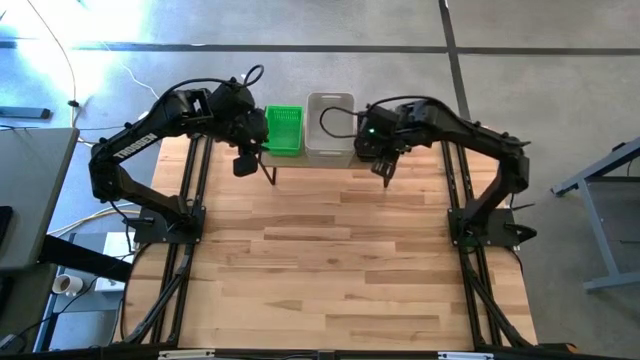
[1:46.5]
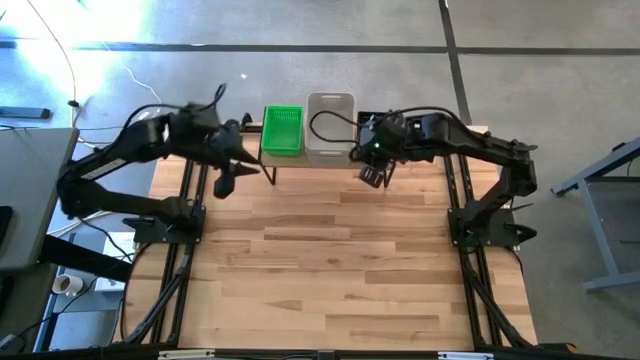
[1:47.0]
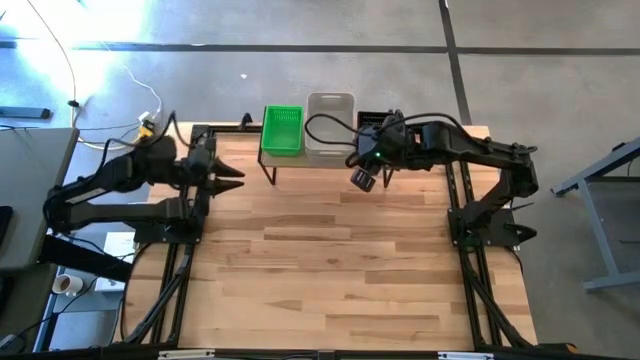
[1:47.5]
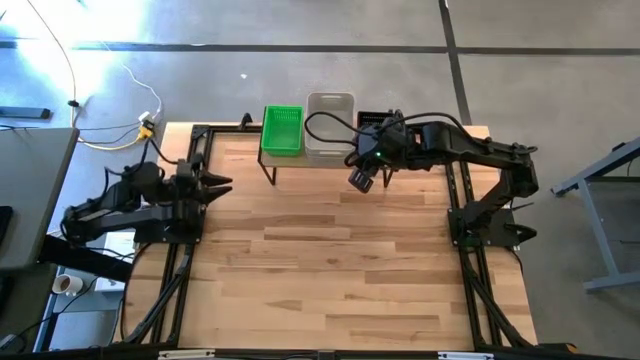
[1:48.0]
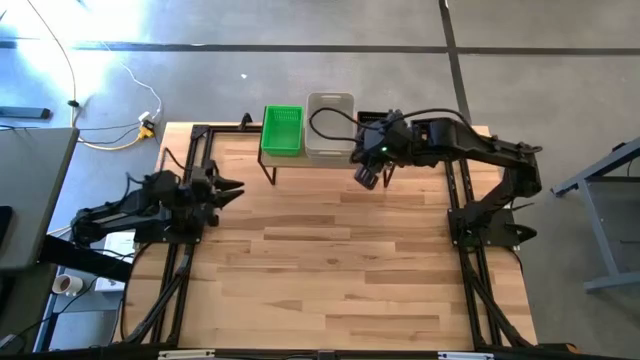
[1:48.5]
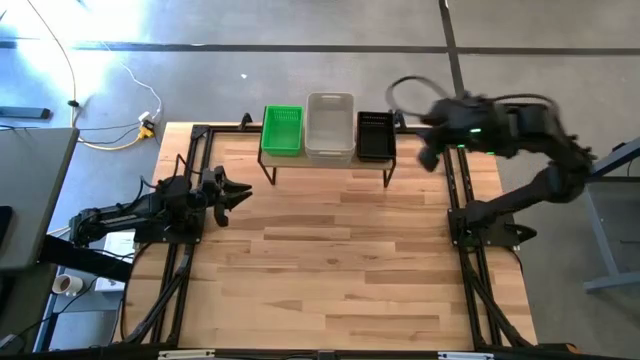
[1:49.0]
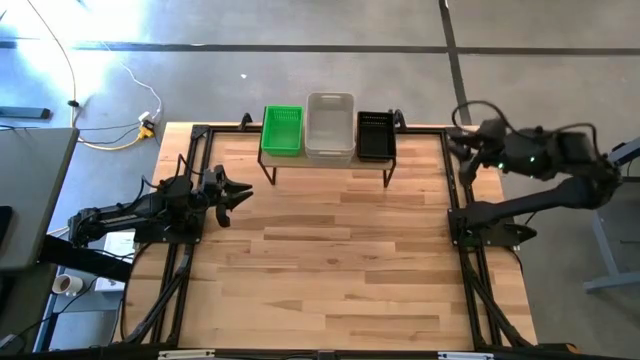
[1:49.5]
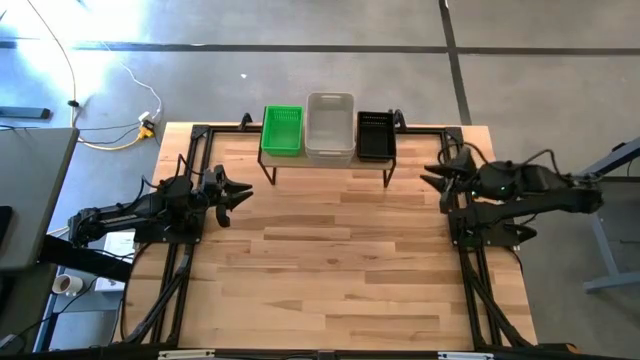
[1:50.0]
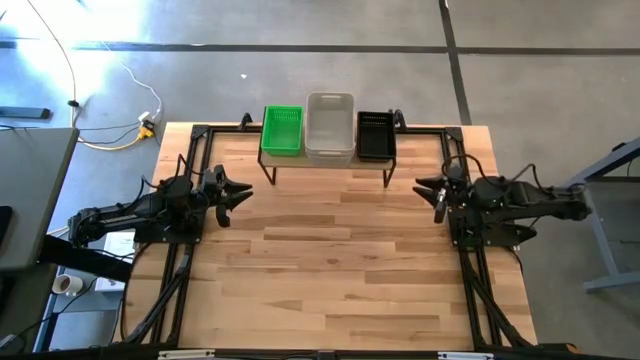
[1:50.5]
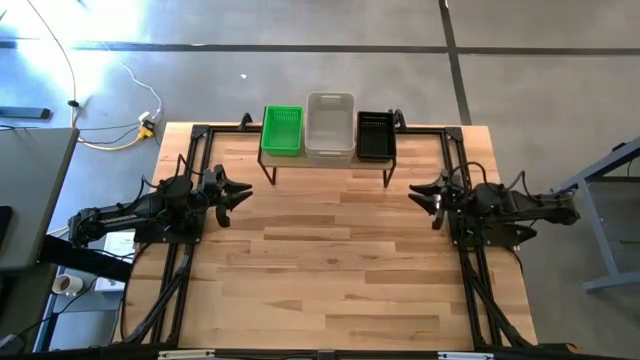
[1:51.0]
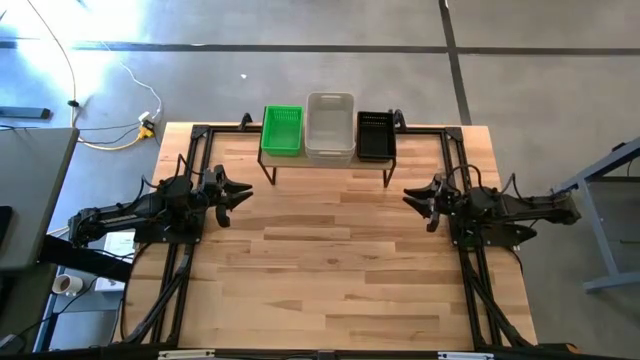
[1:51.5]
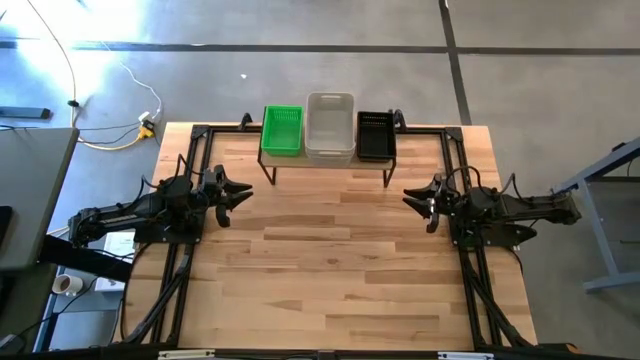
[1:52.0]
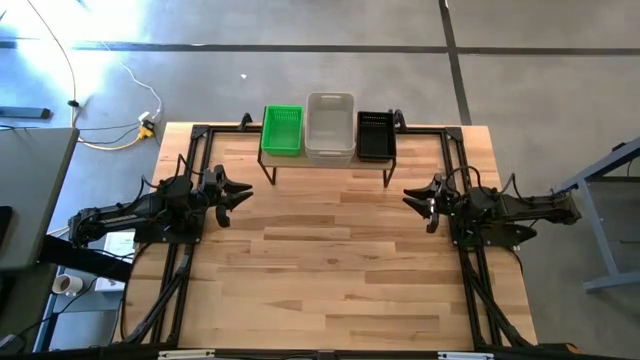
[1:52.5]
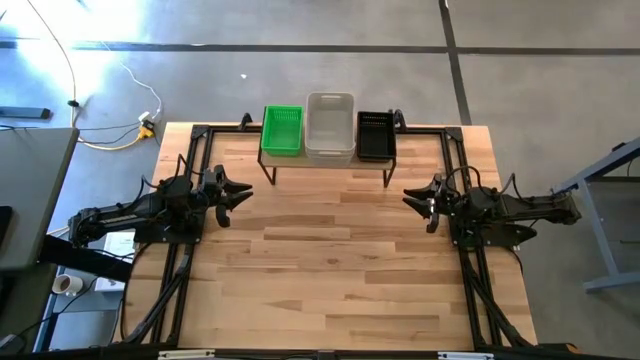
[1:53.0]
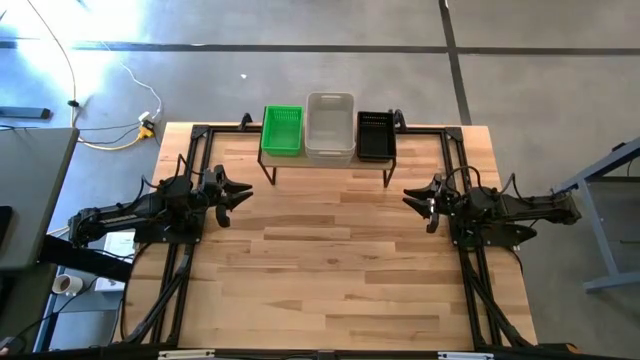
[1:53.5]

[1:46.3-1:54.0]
Task: Stack baskets on shelf by color
Return to Home Position

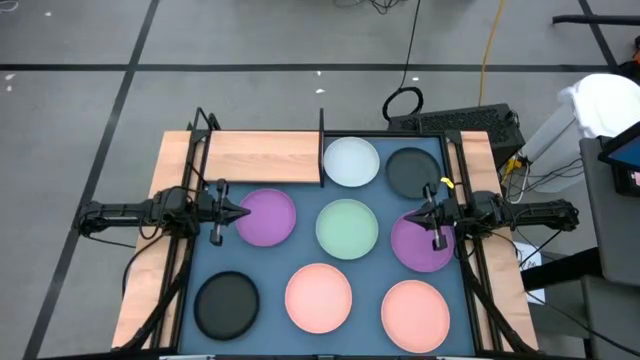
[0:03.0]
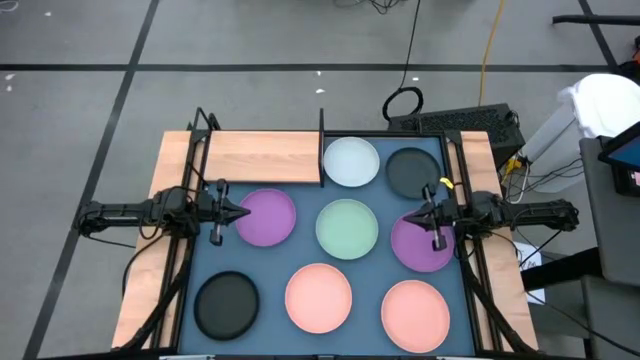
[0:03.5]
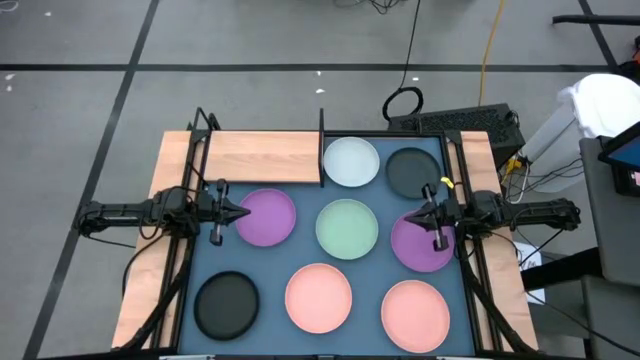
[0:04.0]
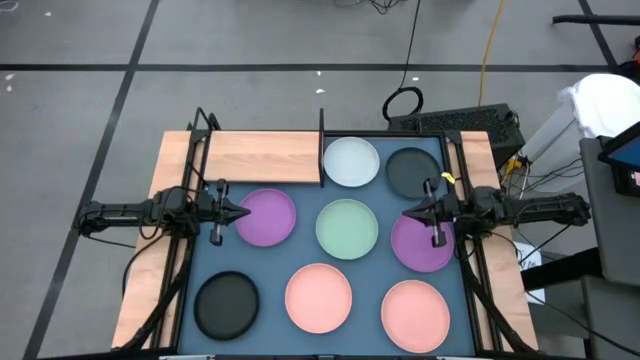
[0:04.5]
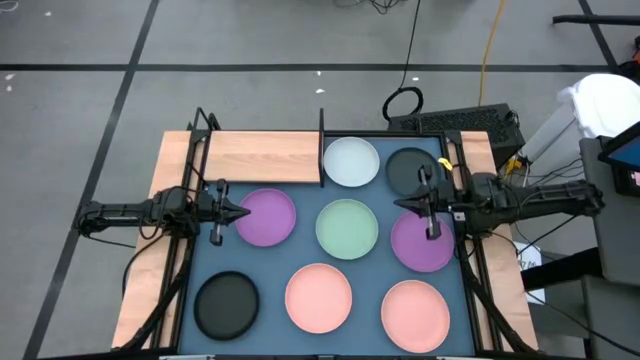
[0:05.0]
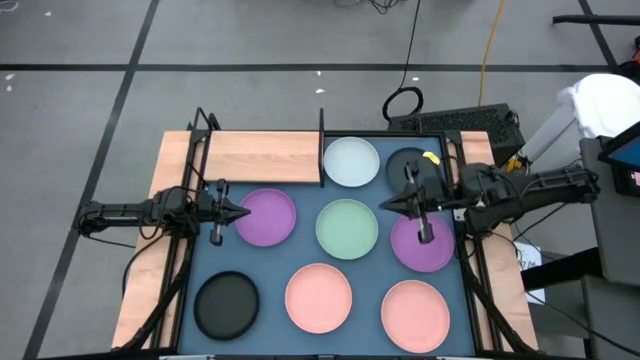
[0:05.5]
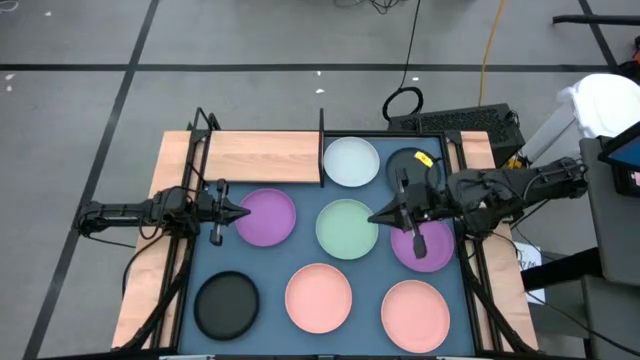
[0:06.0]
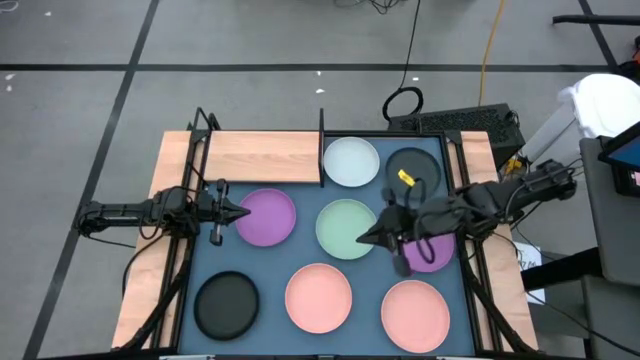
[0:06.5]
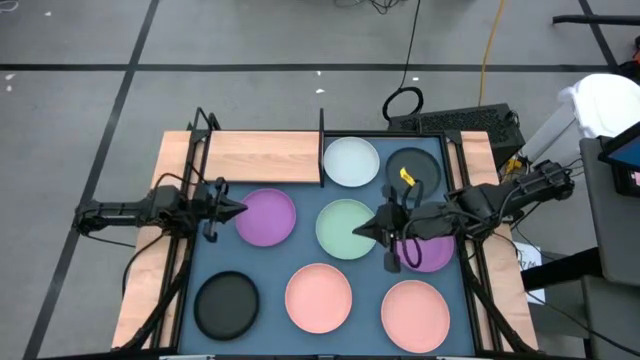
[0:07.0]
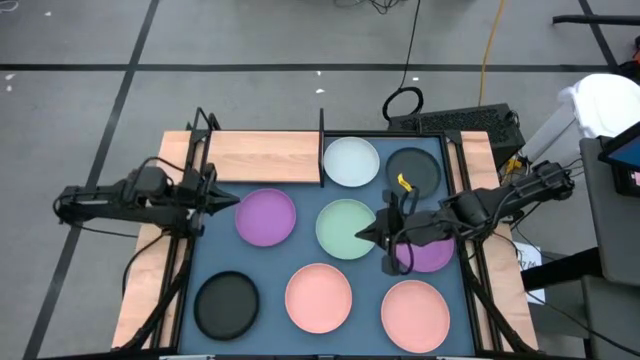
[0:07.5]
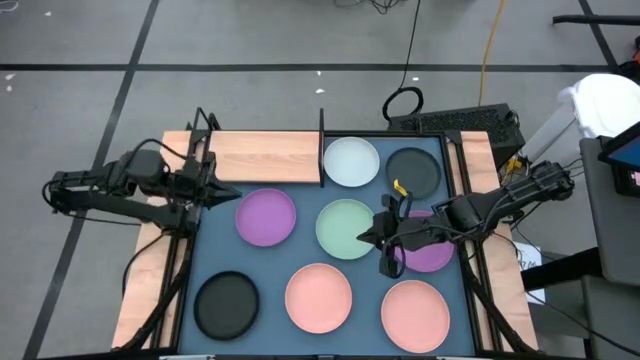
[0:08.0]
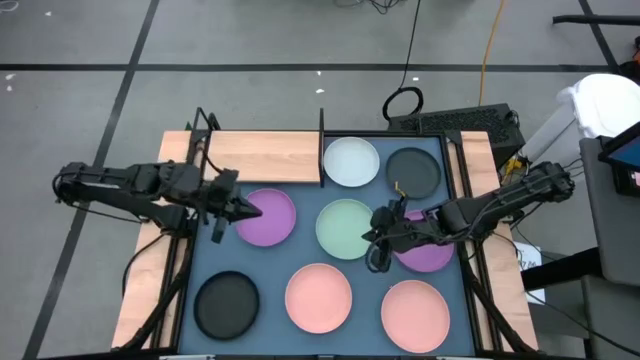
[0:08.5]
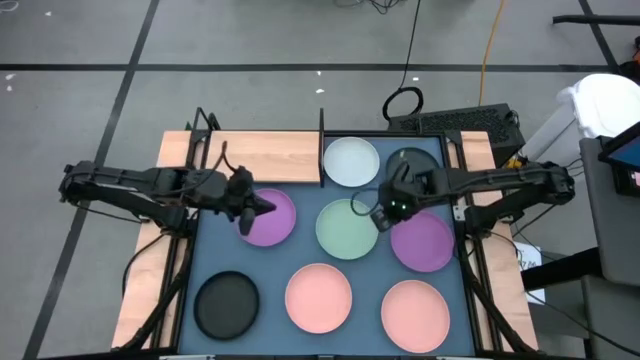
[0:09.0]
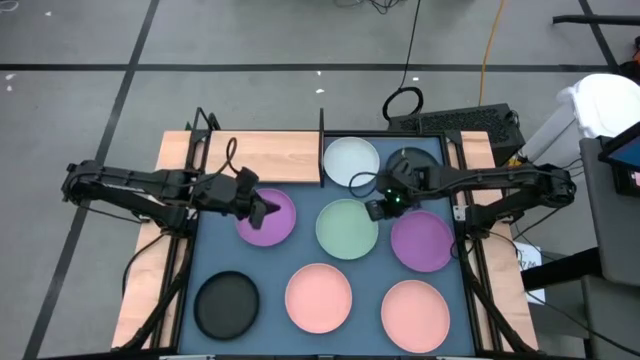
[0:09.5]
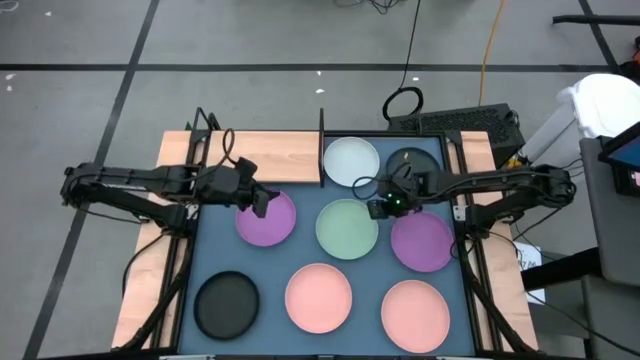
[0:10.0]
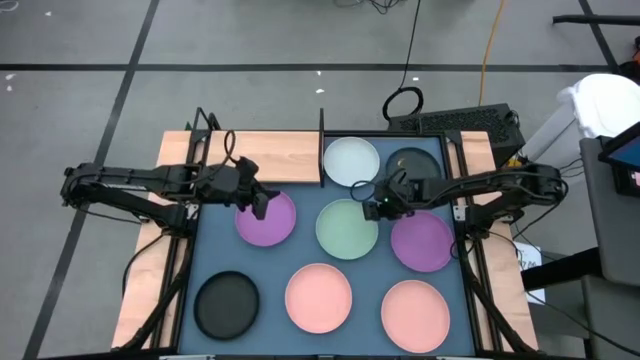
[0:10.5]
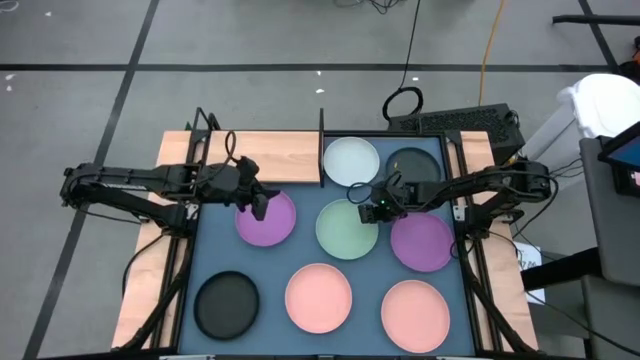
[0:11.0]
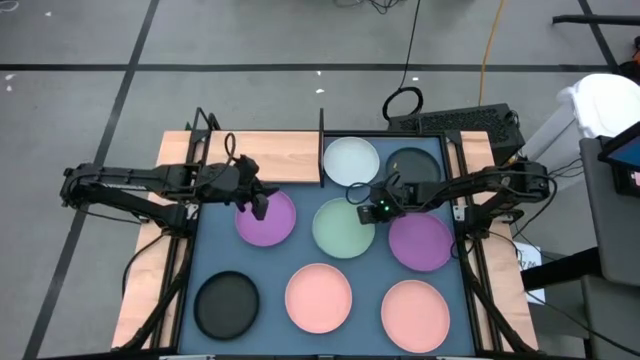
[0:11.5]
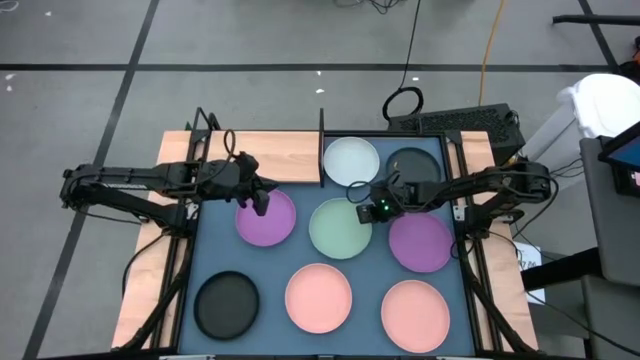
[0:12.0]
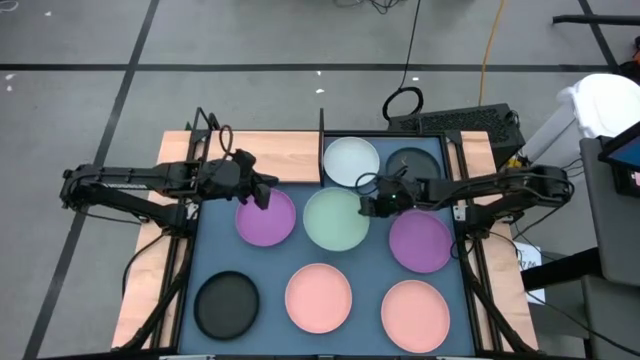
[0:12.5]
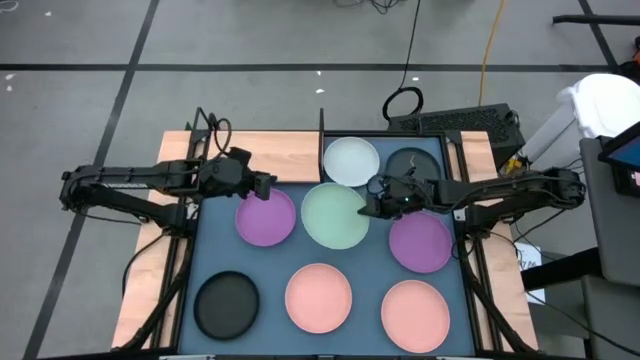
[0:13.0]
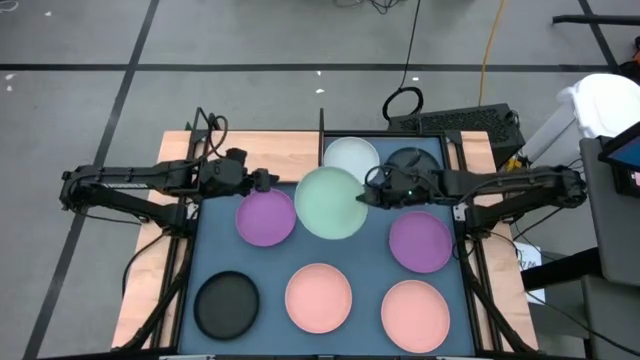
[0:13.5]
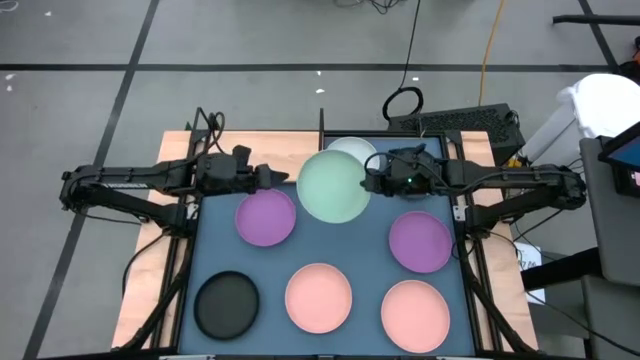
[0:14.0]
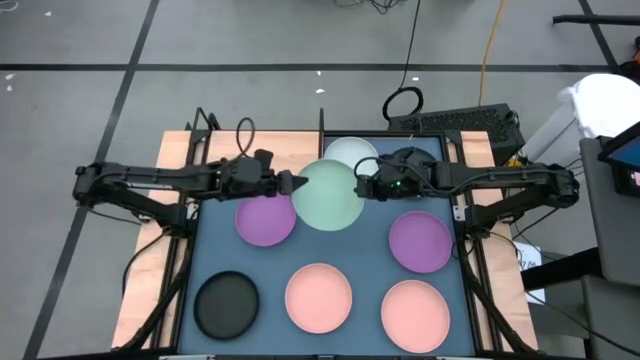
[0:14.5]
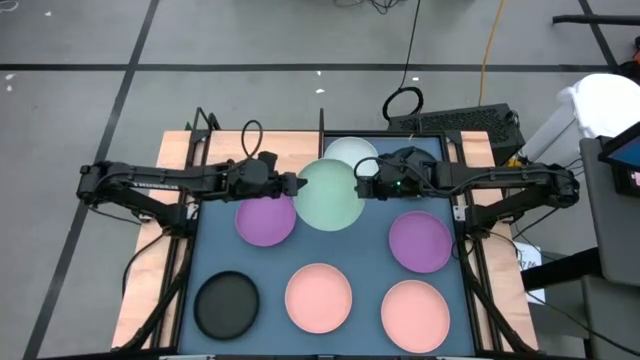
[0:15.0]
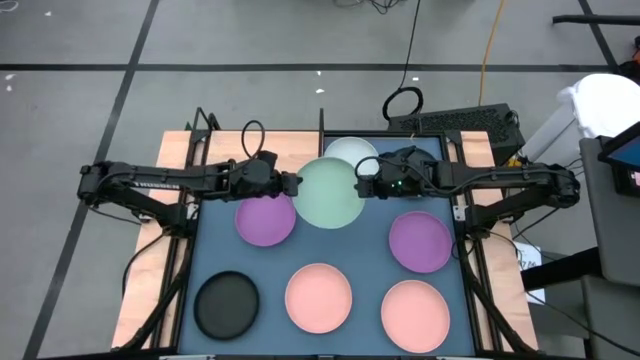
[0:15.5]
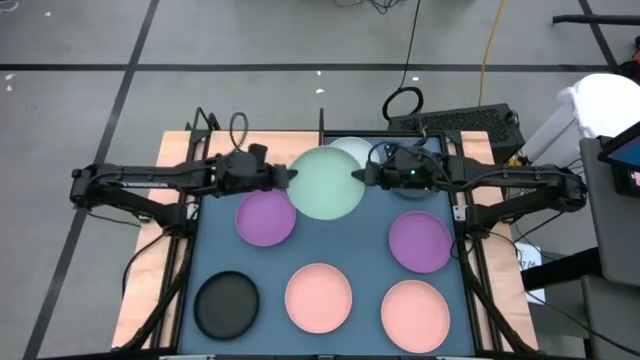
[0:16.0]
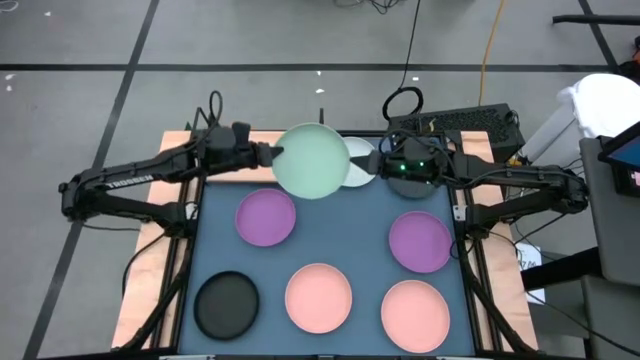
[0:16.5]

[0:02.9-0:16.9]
Task: Place and stack plates onto a shelf
Put the light green plate on the shelf
